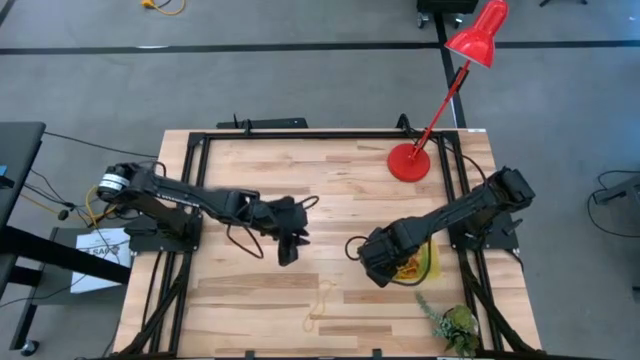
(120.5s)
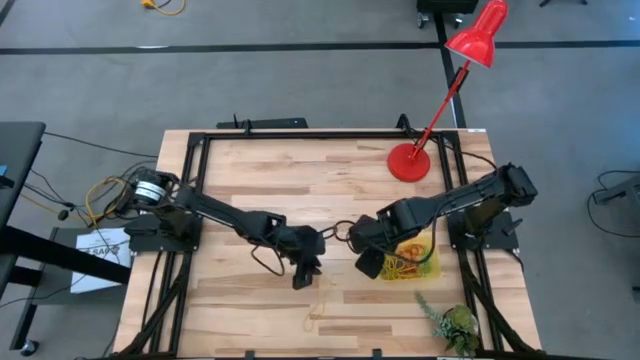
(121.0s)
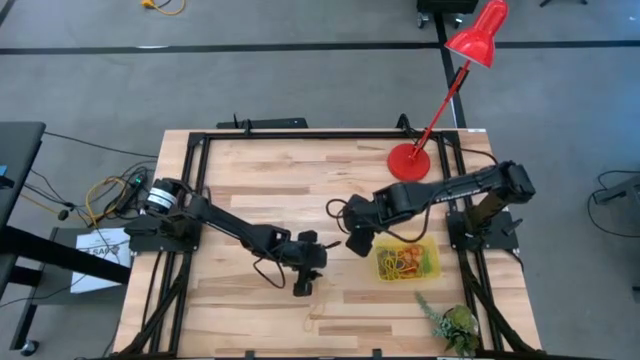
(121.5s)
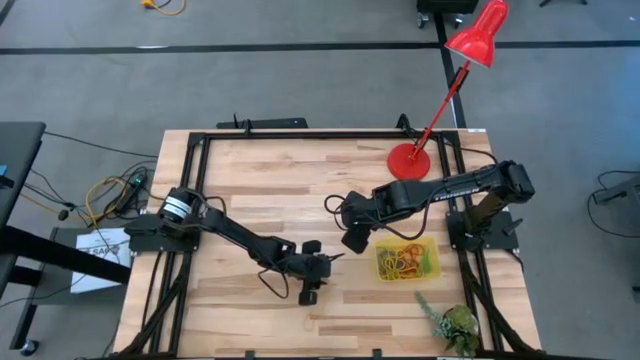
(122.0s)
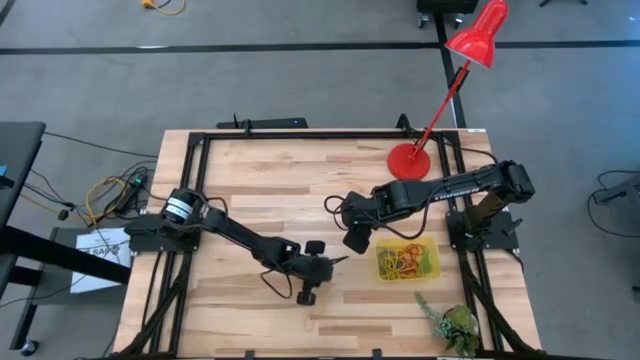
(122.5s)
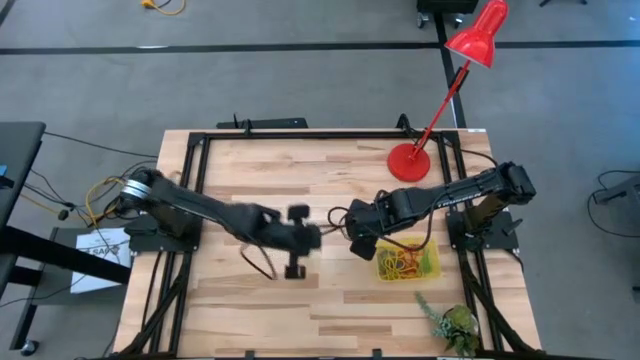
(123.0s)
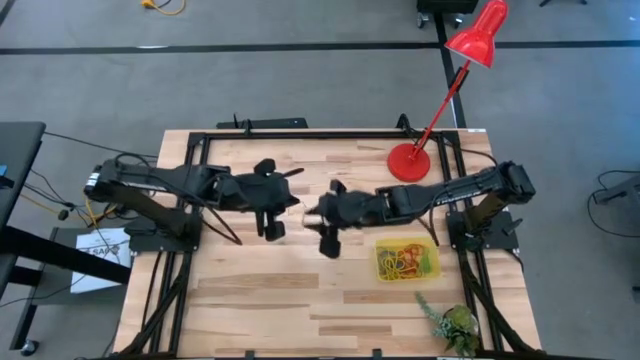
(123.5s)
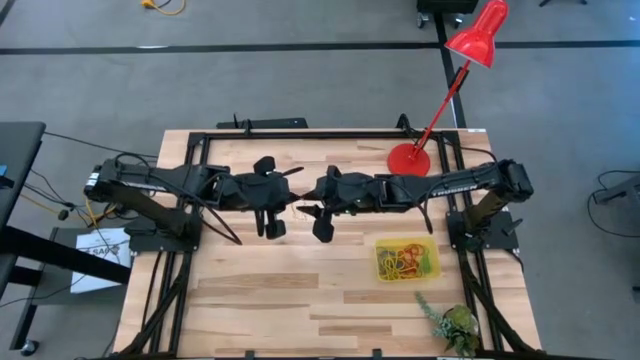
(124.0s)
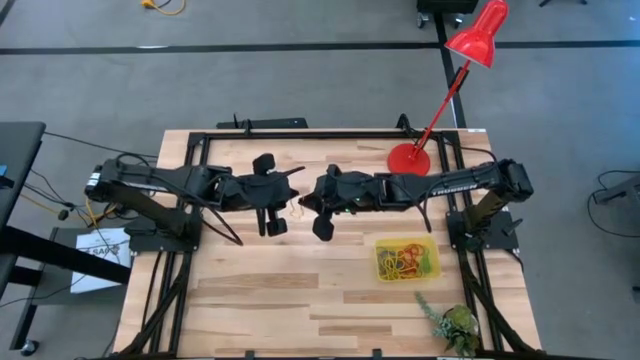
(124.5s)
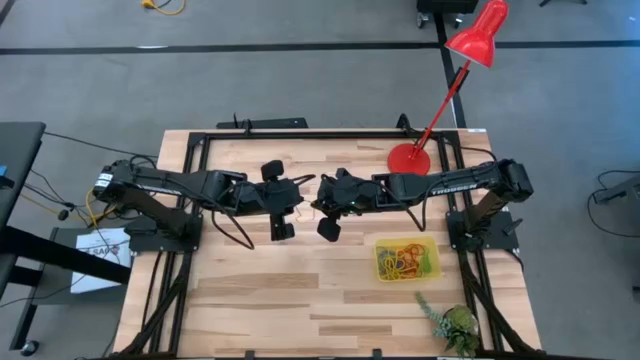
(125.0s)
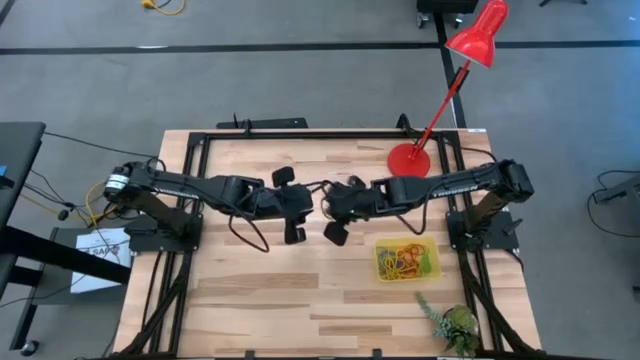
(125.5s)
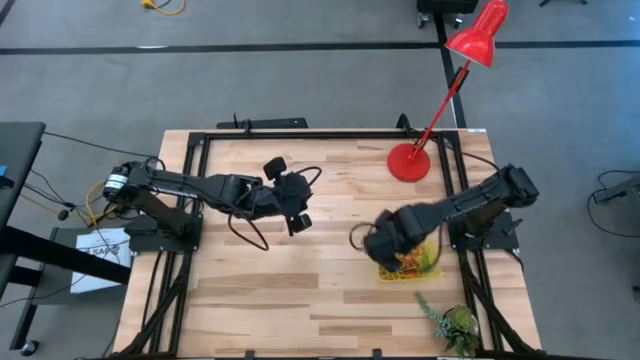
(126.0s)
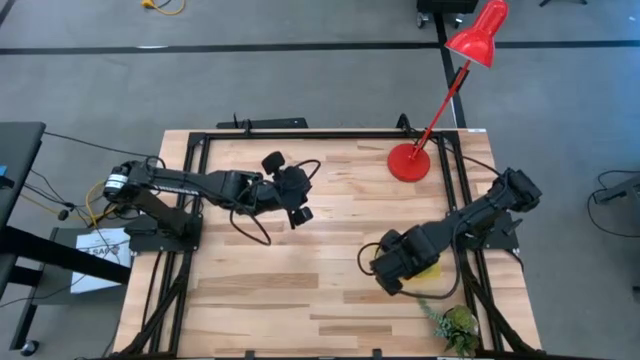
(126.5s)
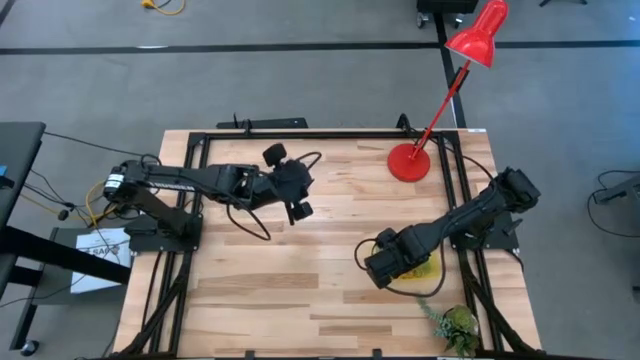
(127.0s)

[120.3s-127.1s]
Task: Pick and place items into bin
Put the yellow rubber band into the yellow bin

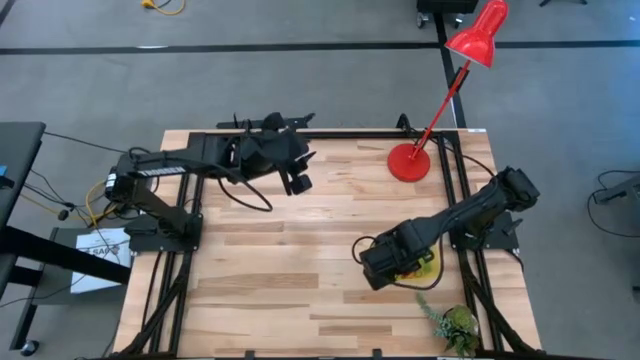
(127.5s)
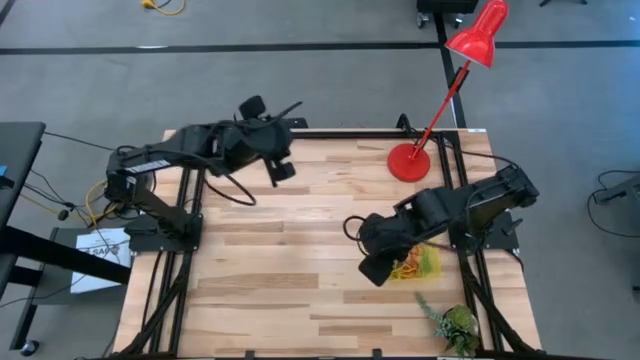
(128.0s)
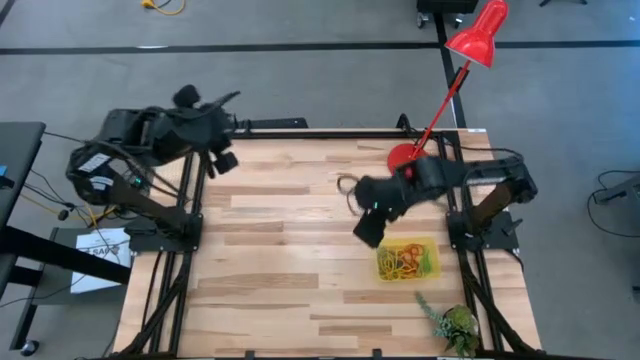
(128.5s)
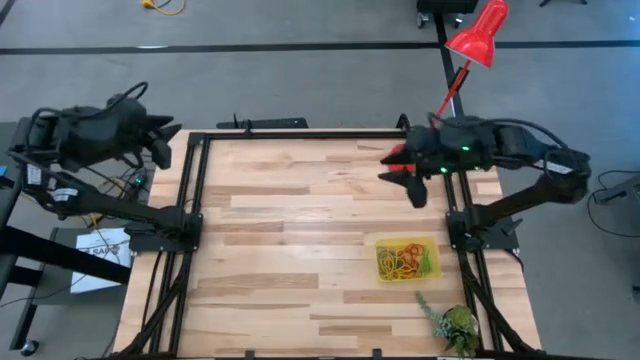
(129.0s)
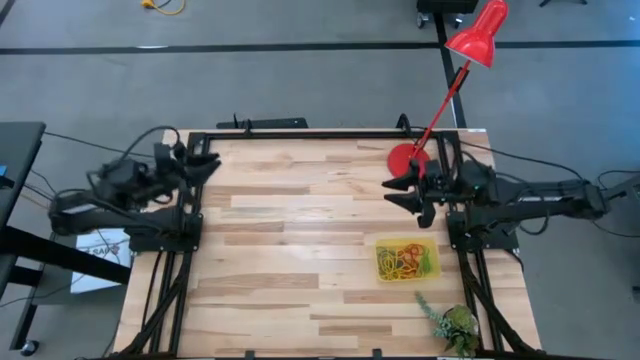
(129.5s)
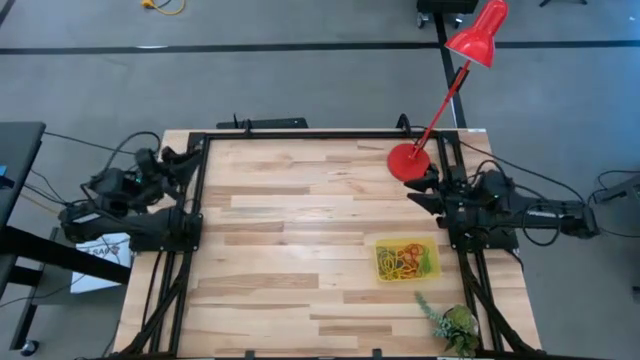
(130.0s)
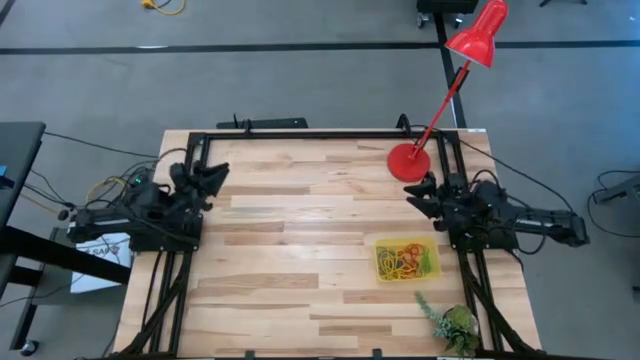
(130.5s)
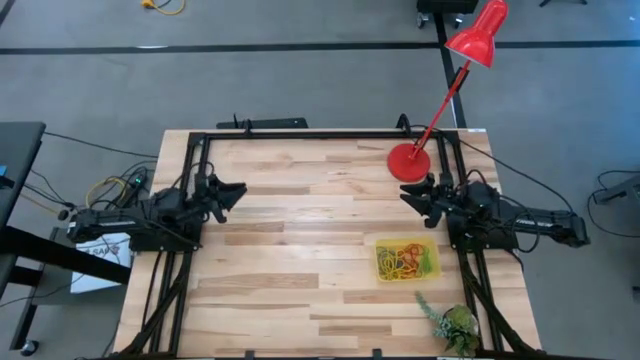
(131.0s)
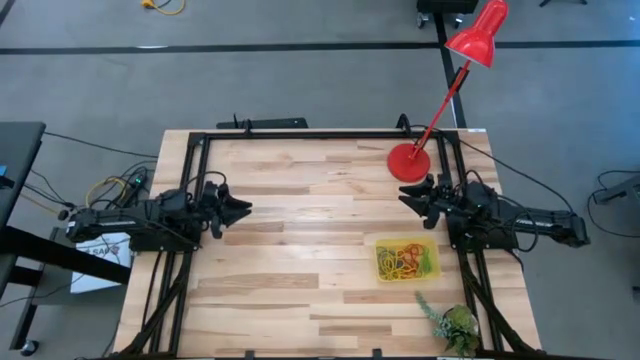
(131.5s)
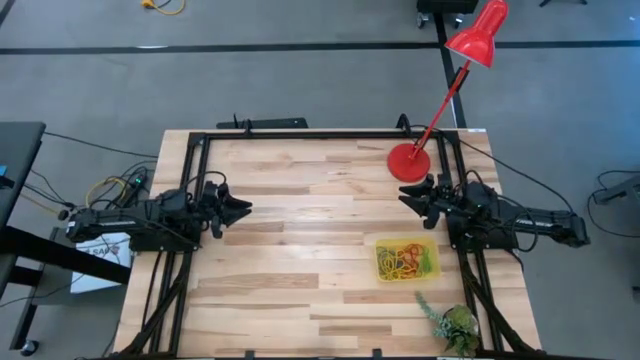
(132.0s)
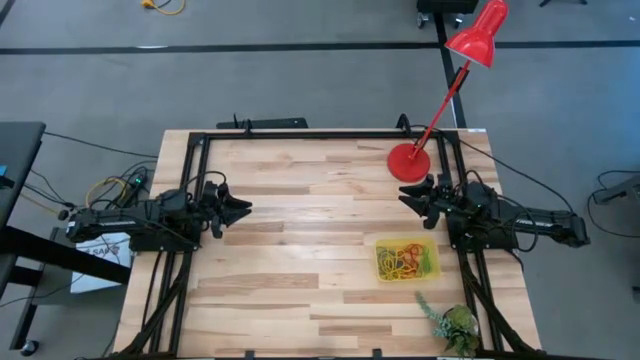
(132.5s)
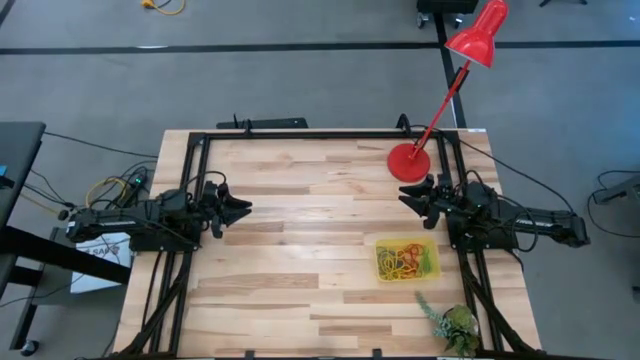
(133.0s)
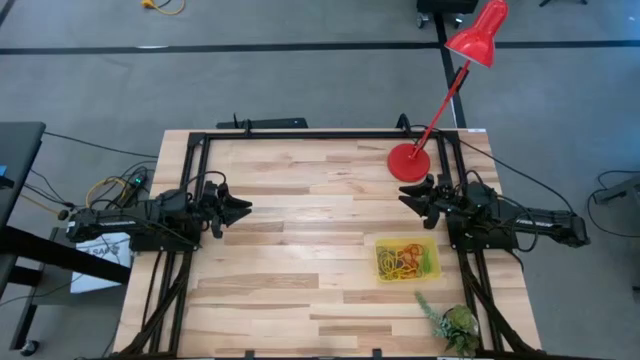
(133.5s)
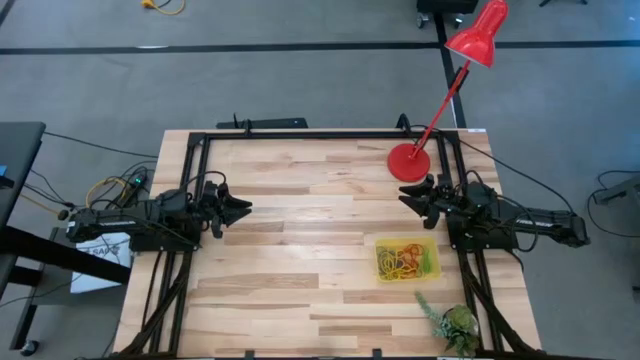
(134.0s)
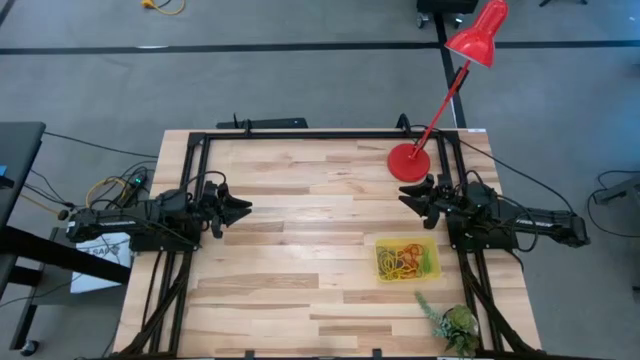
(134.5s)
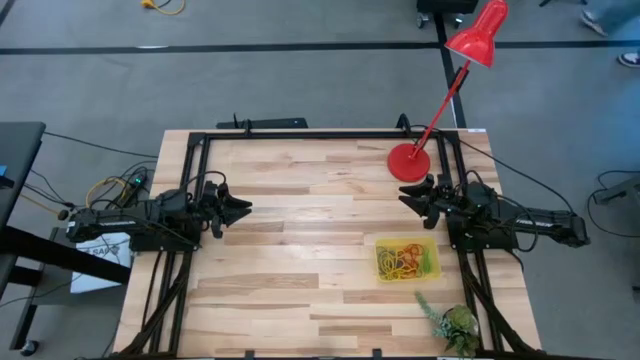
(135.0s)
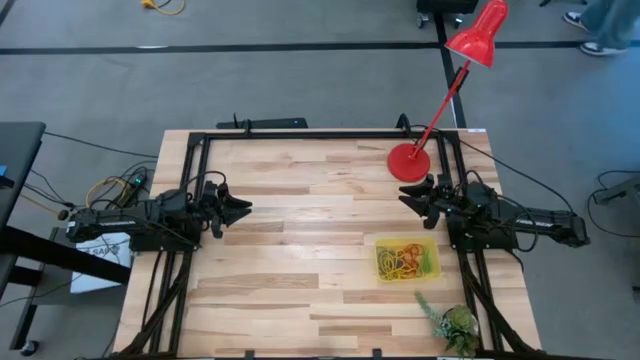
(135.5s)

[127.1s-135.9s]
Return to Home Position

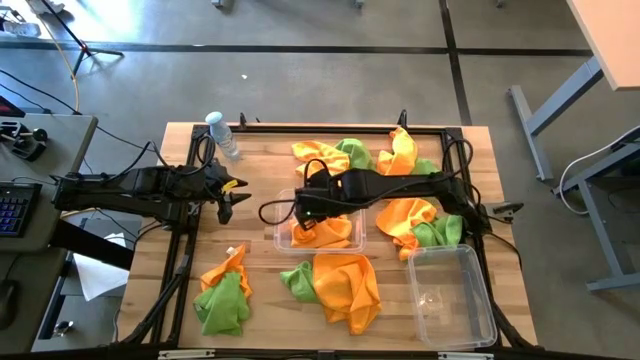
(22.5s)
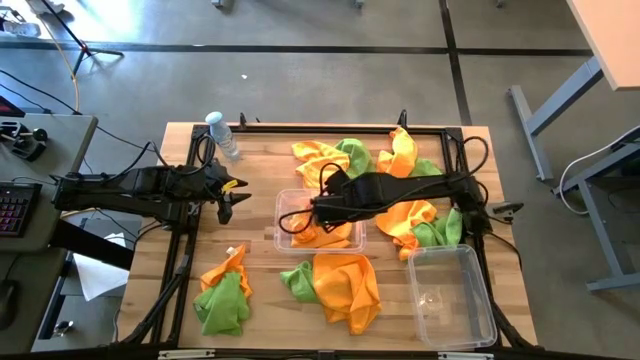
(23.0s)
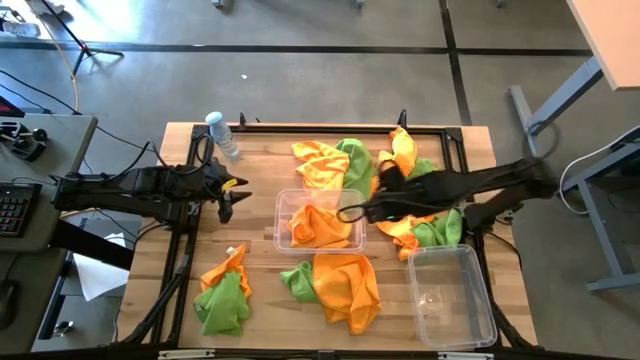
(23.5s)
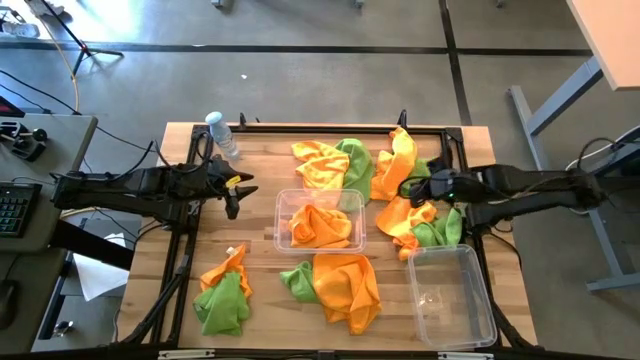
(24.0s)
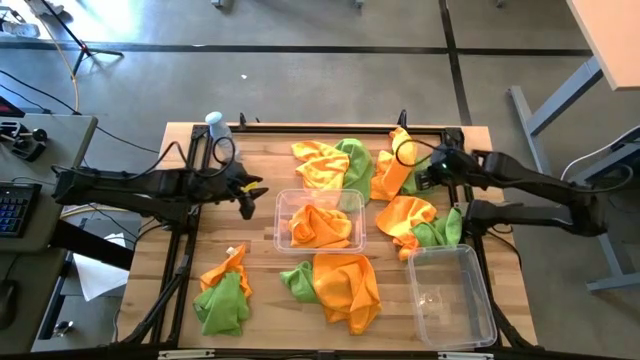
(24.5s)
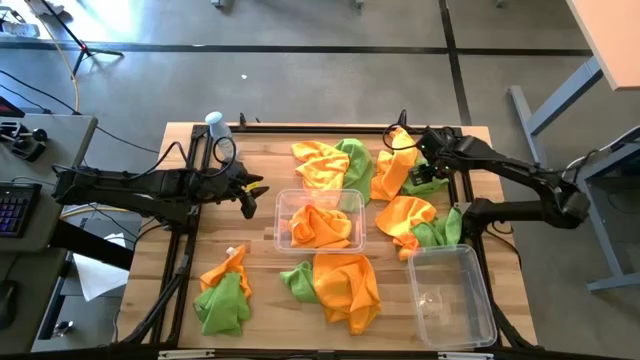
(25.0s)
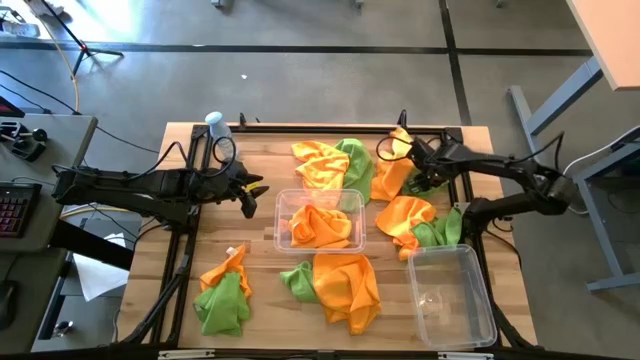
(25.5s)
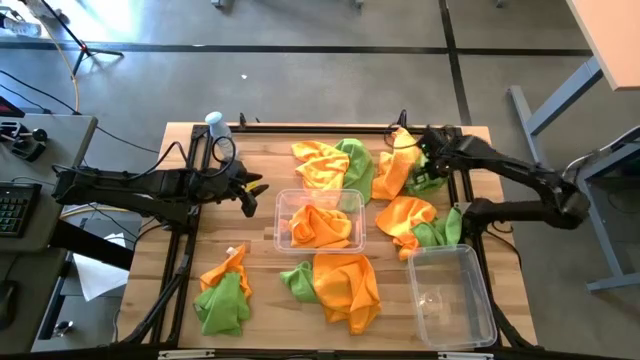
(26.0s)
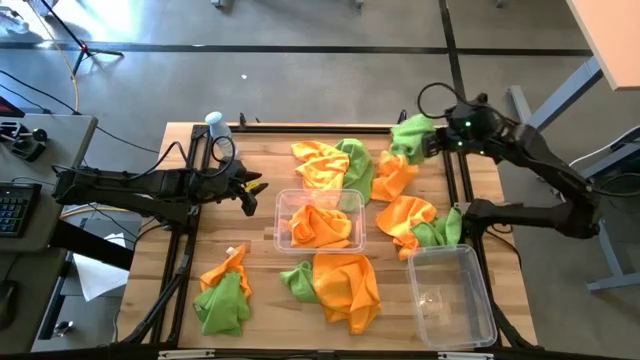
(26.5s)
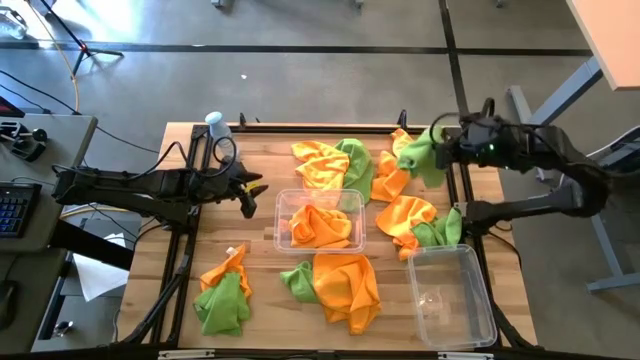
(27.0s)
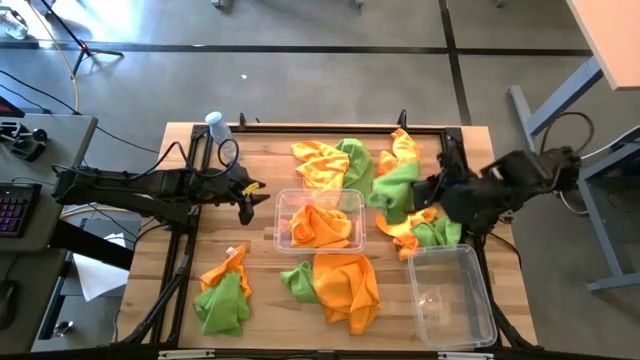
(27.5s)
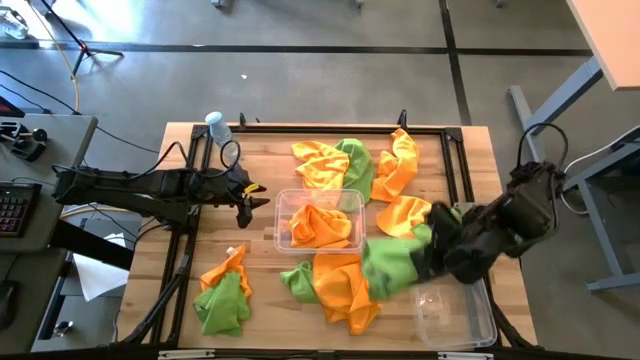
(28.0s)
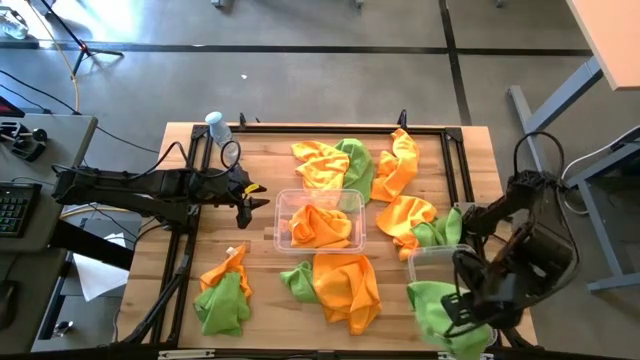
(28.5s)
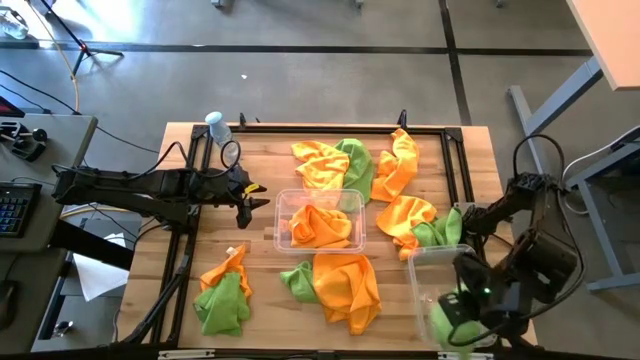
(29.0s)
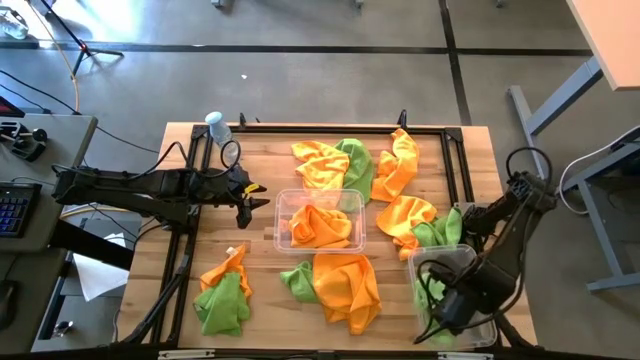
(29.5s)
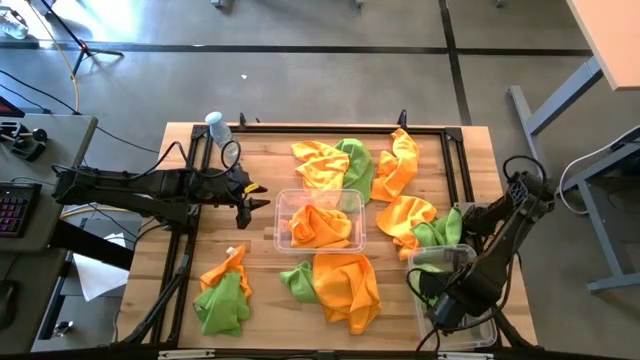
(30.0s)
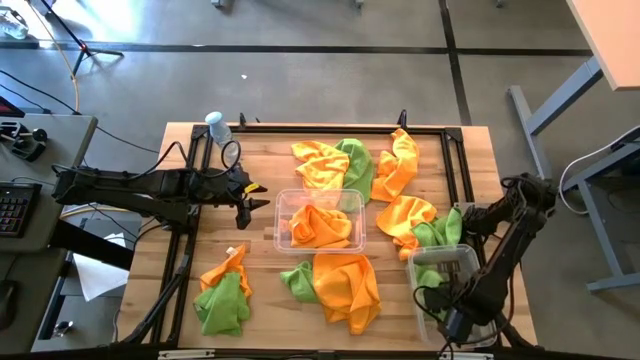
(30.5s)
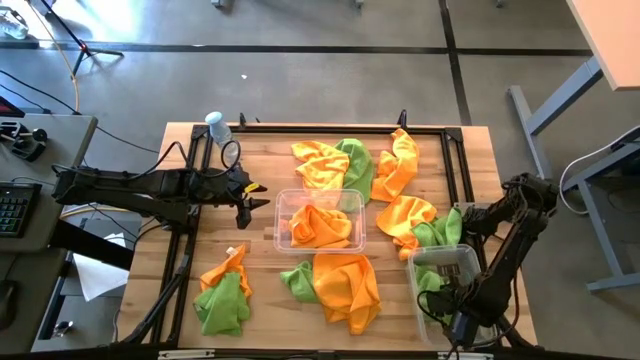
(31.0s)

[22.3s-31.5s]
Task: Sort microfiber towel by color & place in baskets
Put the green towel into the bottom transparent bin
